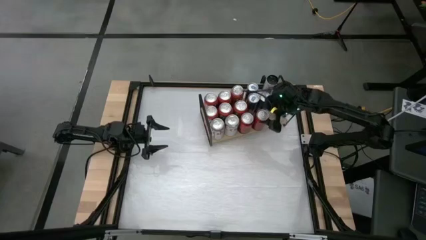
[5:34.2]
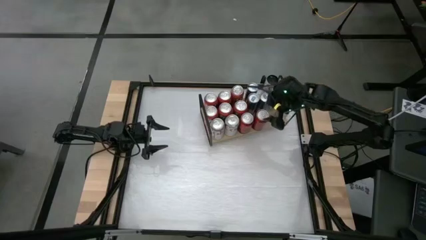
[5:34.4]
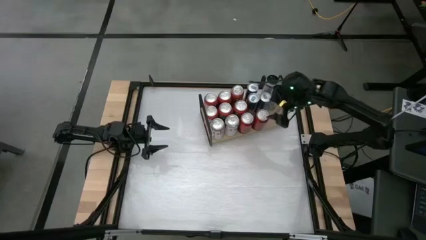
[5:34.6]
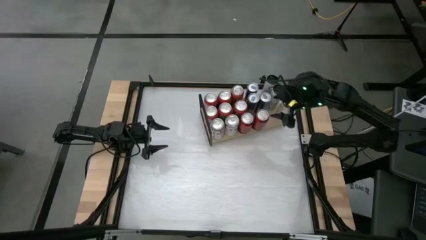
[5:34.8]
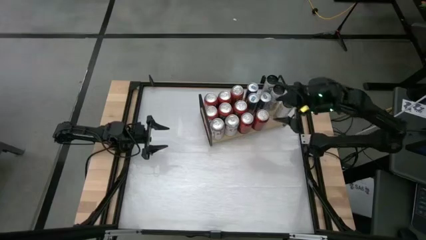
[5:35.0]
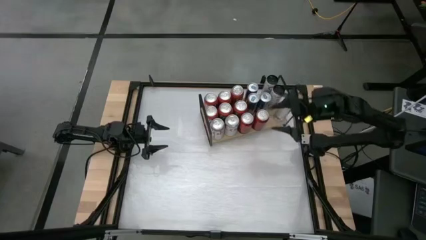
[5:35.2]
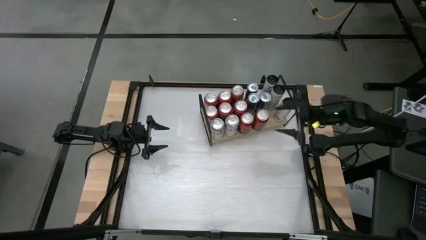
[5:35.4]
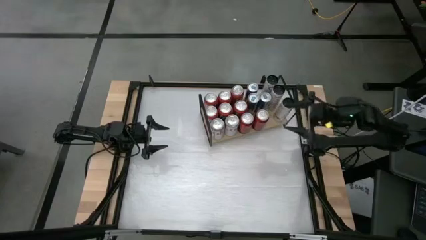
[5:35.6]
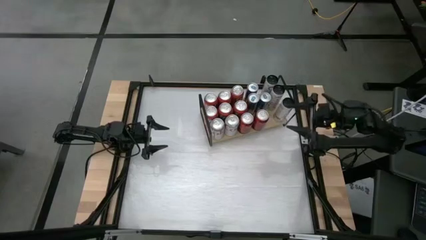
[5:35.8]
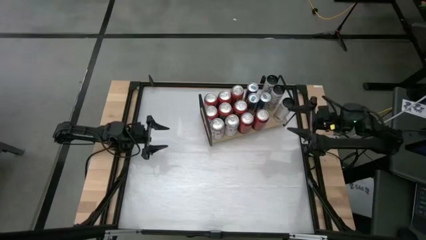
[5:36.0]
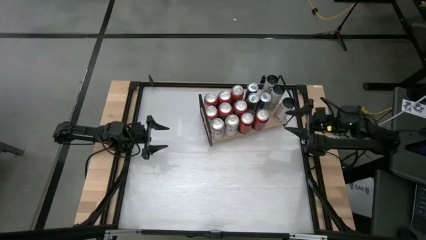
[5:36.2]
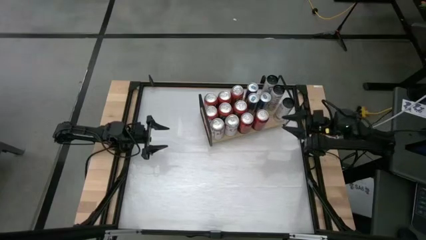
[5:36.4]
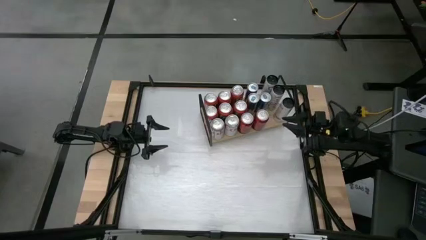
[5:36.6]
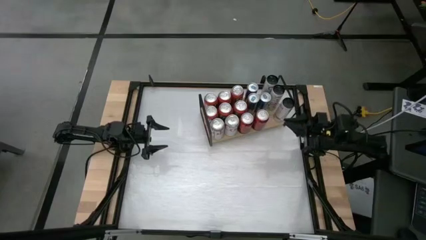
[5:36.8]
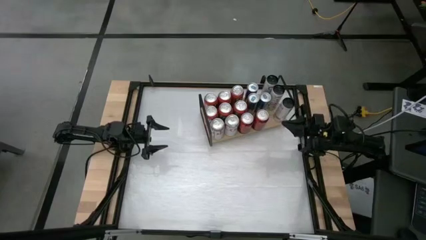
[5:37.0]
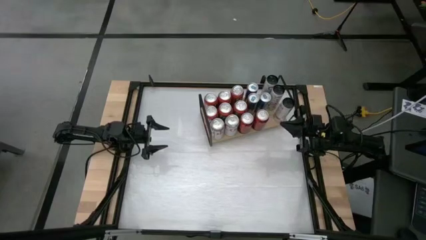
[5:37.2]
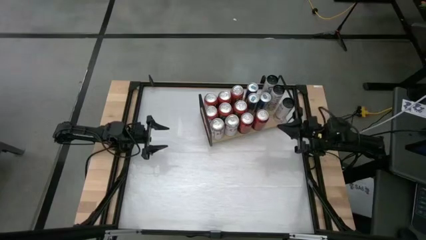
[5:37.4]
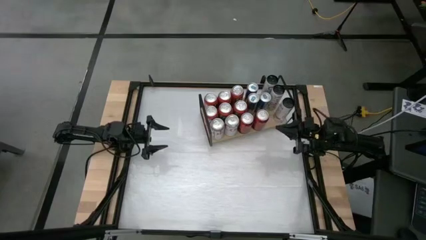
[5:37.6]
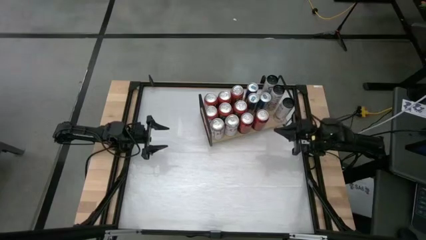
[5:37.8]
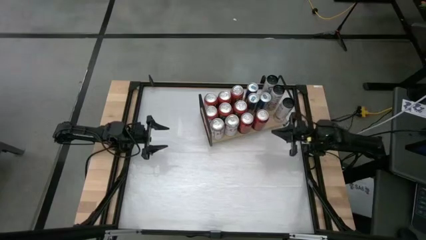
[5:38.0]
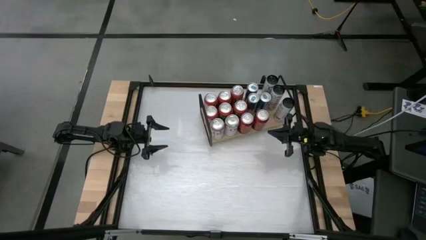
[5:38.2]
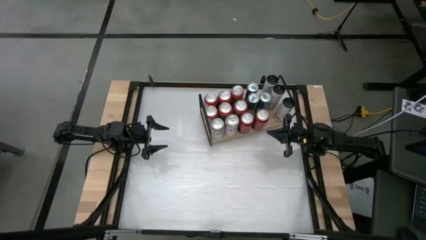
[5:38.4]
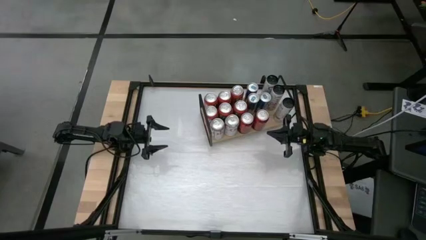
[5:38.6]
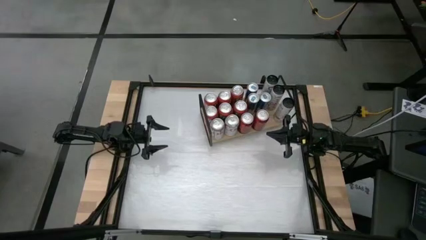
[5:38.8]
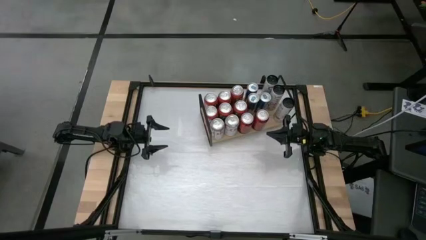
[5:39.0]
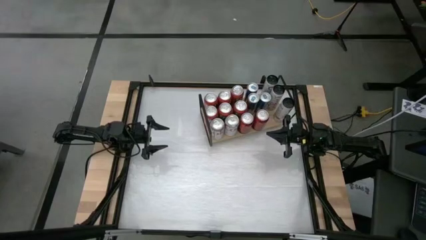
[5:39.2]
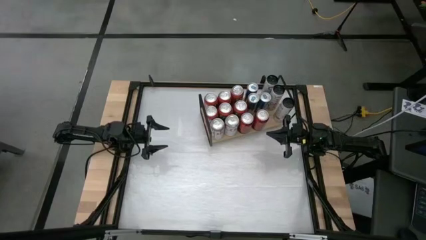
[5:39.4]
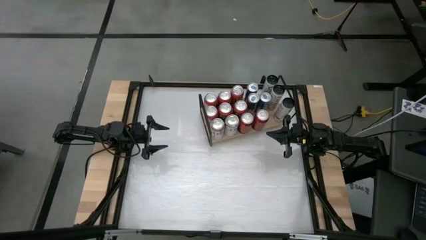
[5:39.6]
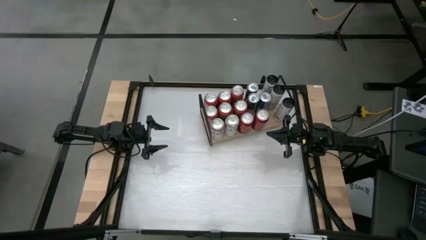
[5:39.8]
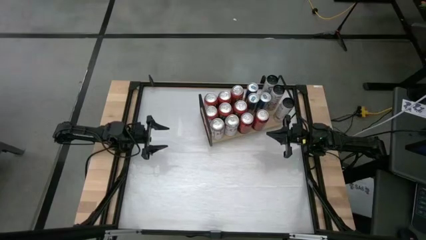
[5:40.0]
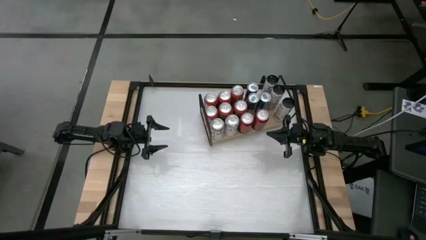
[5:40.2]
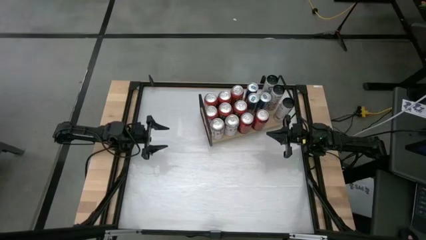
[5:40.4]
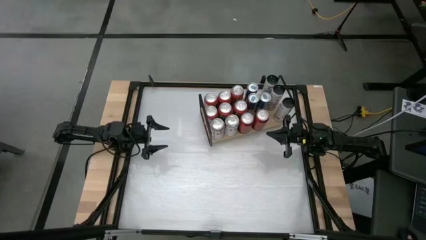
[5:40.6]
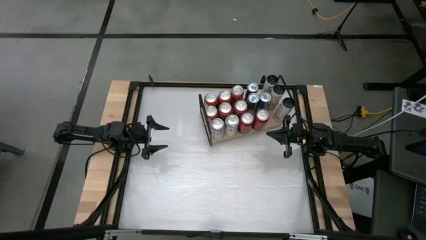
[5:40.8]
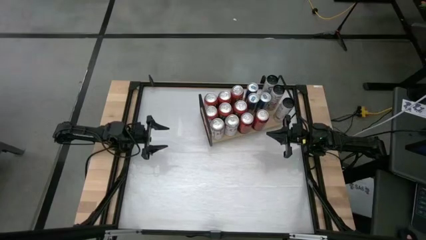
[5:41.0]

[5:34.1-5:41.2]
Task: Place canned beverage on shelf
Return to Home Position

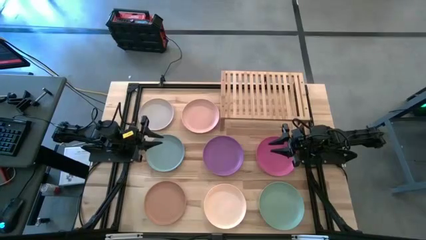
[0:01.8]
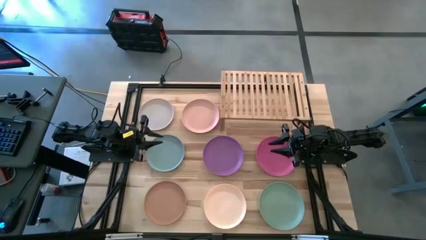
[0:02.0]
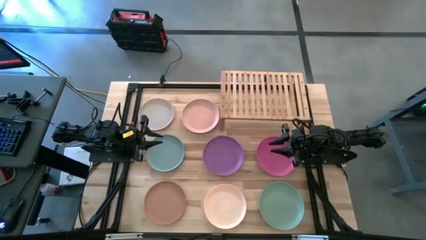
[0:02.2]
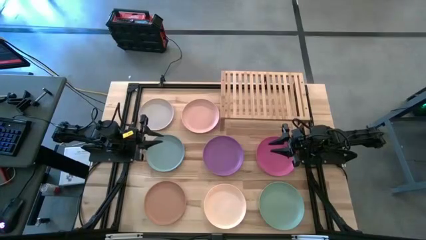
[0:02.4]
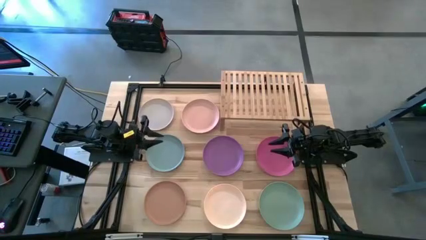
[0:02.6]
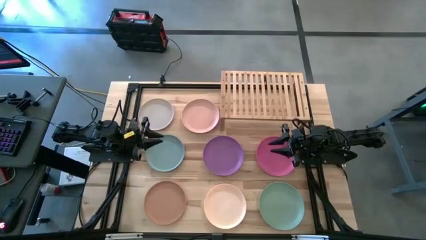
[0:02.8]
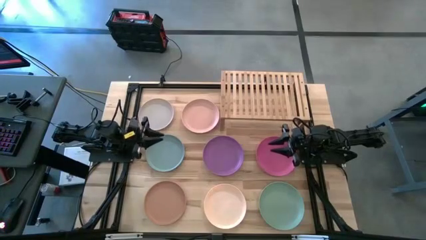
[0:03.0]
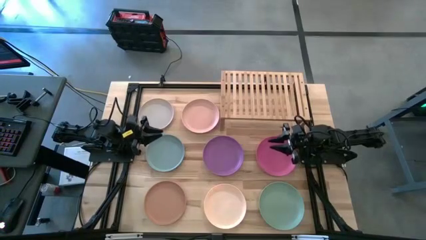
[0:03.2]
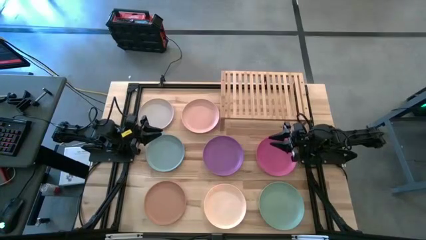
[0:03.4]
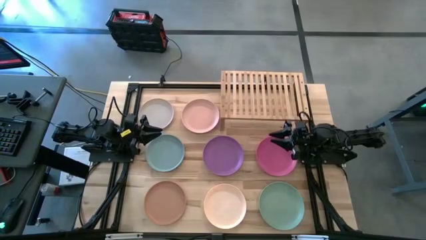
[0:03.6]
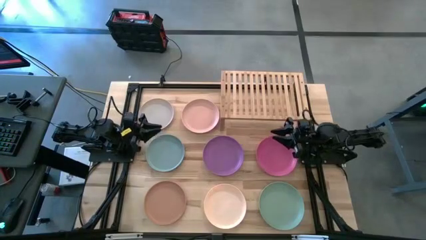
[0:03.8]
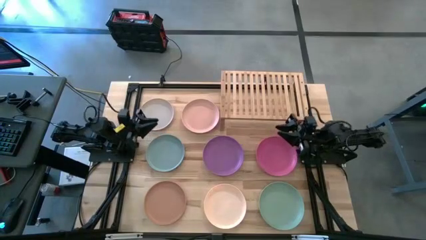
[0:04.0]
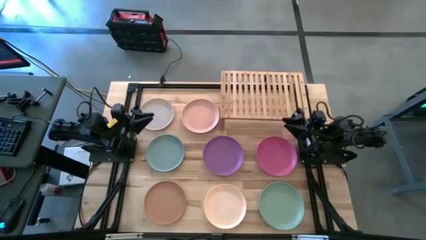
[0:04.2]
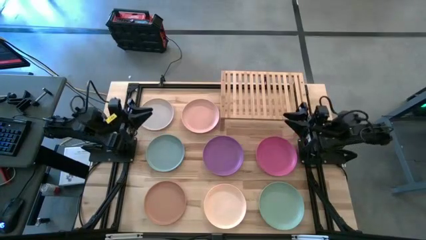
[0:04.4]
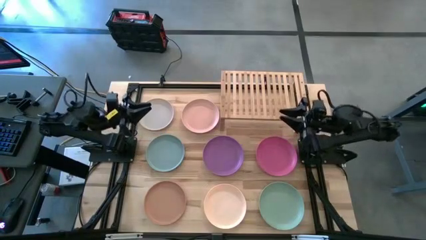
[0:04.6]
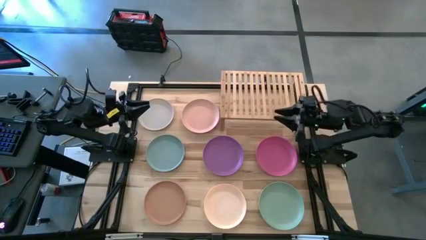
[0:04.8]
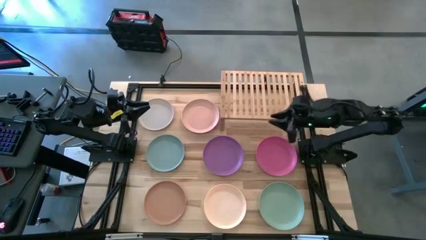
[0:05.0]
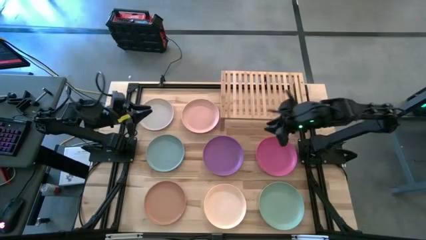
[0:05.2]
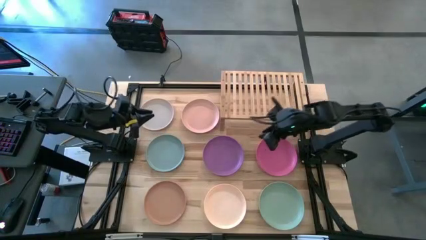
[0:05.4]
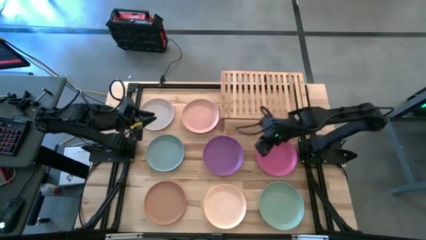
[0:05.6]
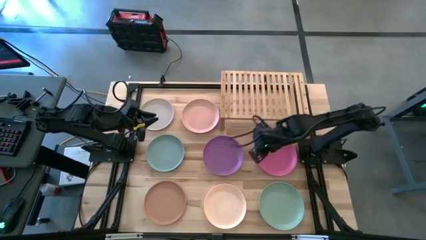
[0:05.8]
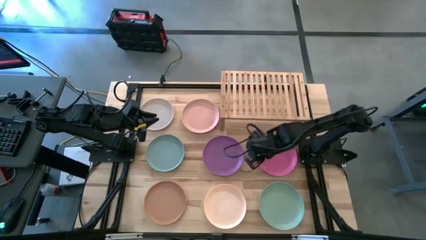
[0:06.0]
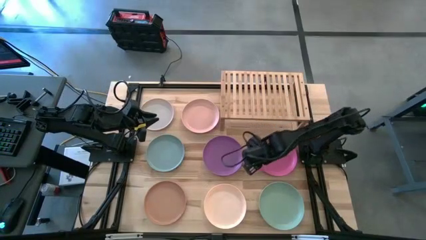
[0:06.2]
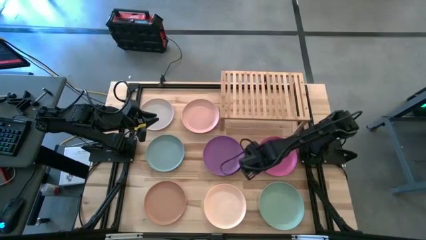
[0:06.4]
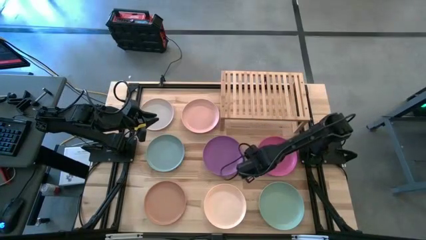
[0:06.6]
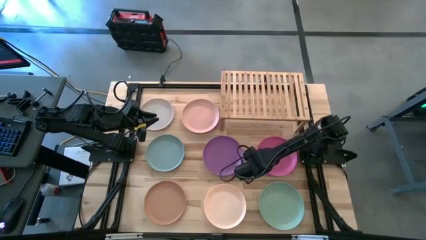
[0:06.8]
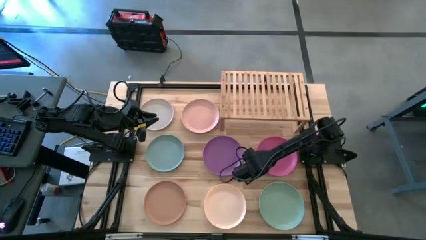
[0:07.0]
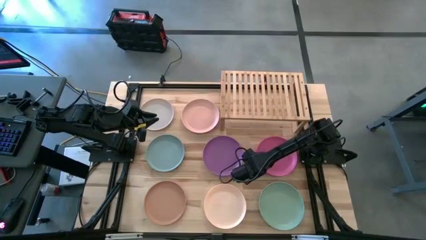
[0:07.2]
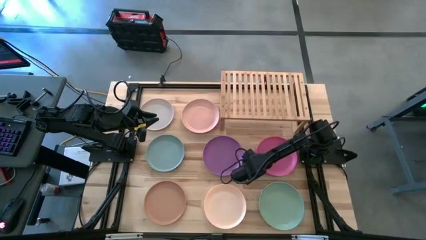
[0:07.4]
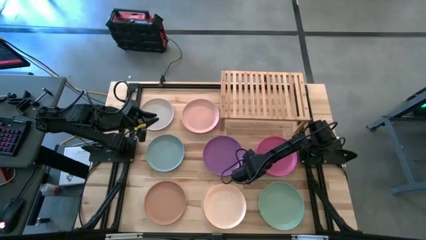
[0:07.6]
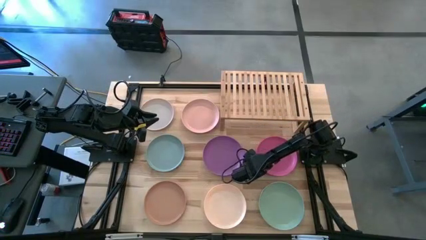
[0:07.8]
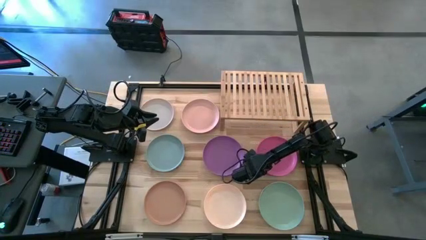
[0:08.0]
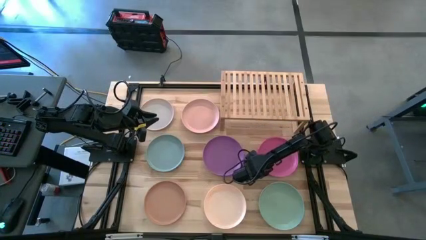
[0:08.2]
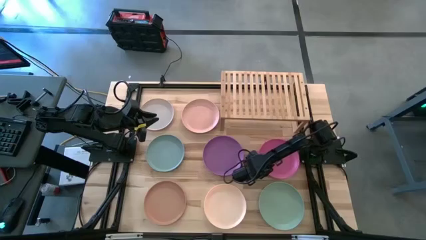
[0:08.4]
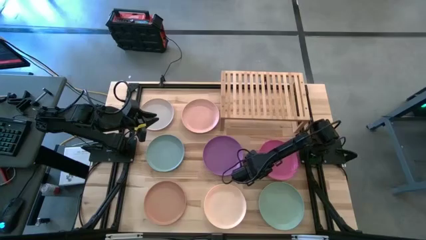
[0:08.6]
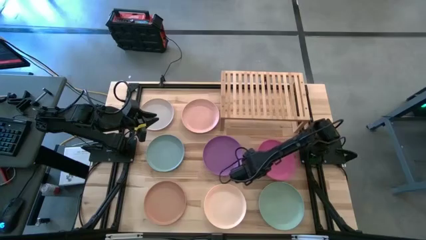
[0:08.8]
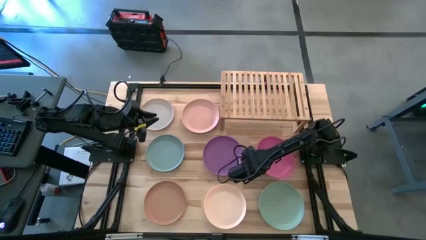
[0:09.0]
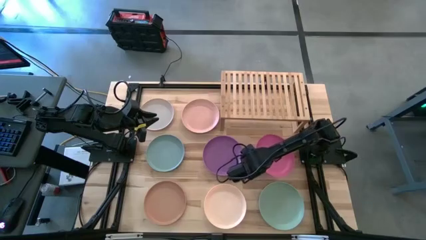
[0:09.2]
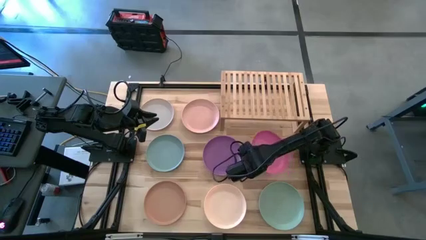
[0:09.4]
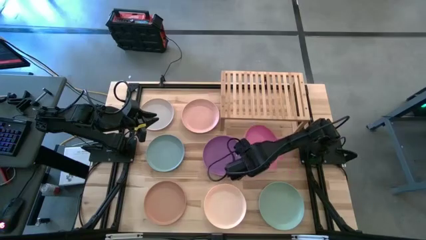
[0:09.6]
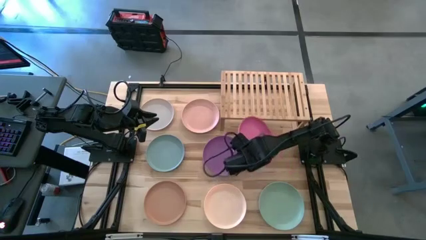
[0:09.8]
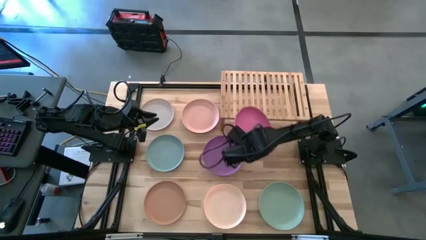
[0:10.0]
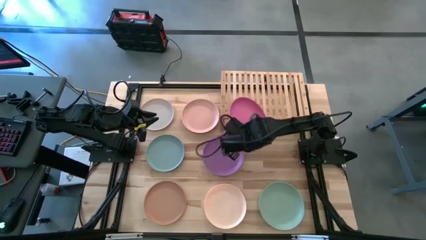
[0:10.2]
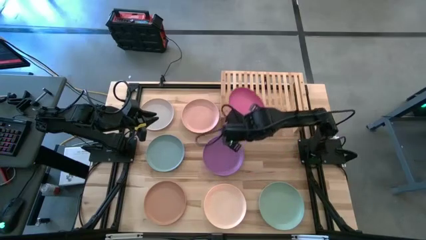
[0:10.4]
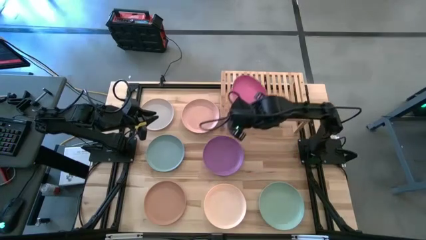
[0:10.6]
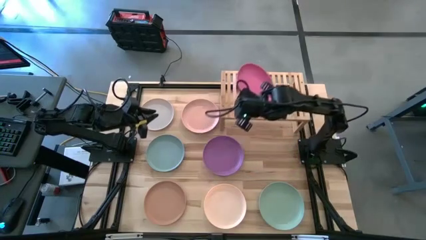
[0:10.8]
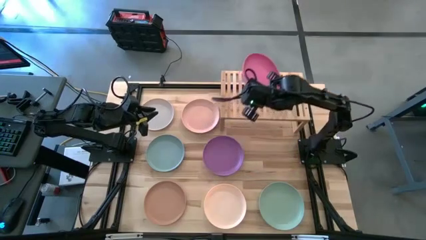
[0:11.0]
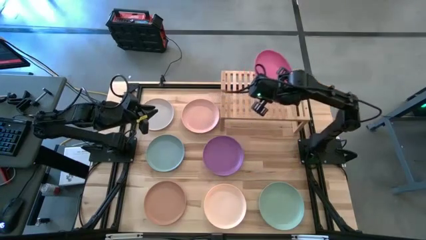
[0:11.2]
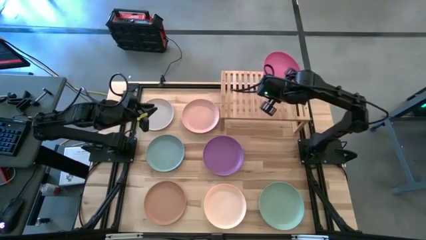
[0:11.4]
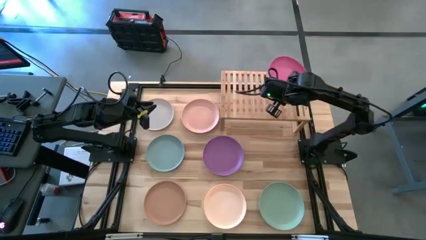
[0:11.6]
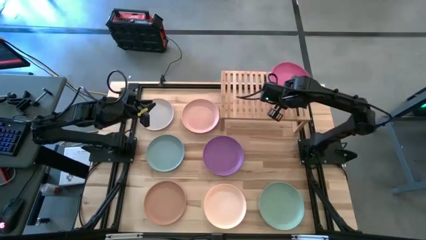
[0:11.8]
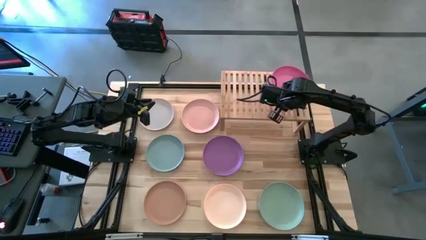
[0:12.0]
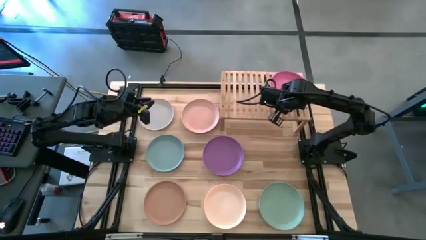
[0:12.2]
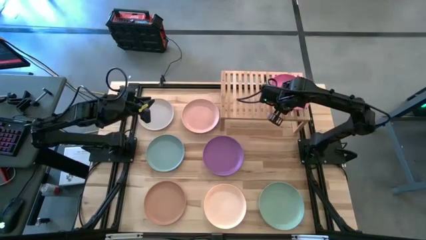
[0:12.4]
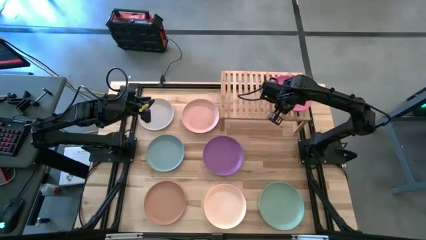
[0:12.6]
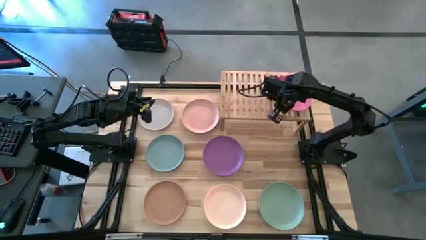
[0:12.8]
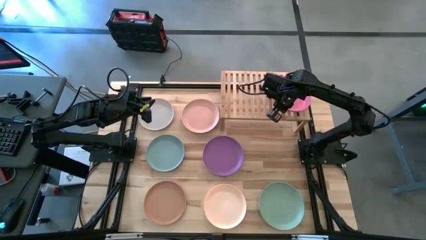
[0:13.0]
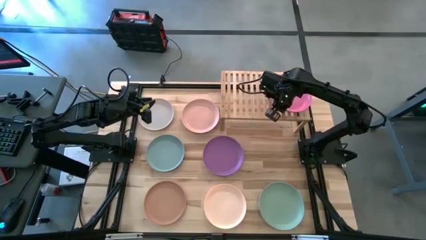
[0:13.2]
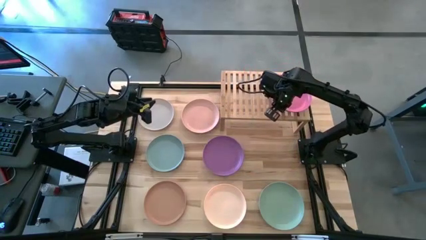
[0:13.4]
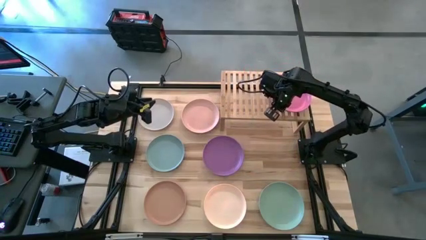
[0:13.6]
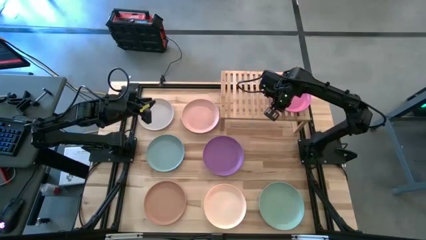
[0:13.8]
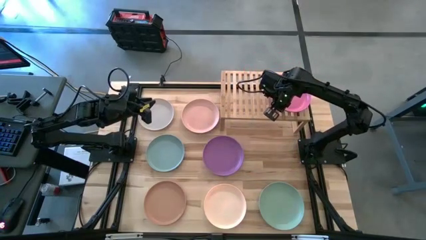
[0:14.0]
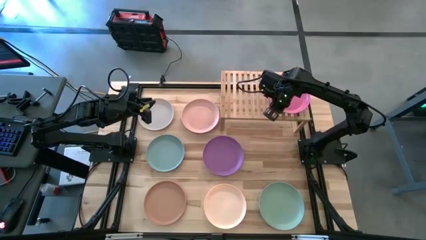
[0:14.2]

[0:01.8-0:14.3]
Task: Place and stack plates onto a shelf
Put the pink plate on the shelf
